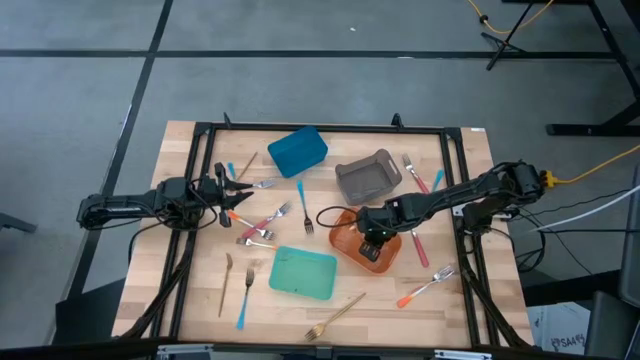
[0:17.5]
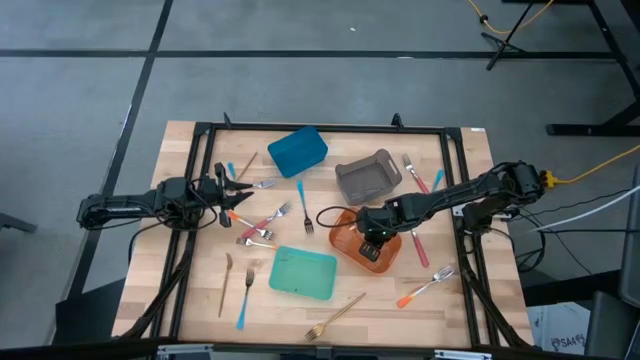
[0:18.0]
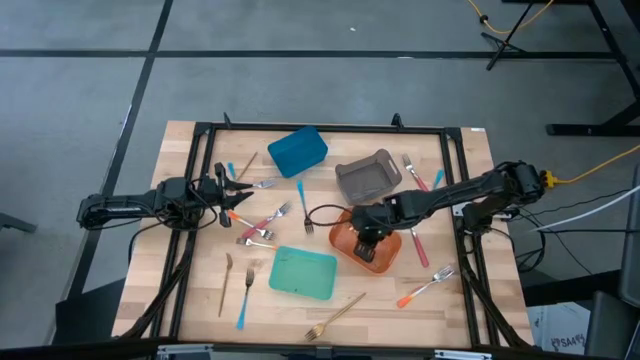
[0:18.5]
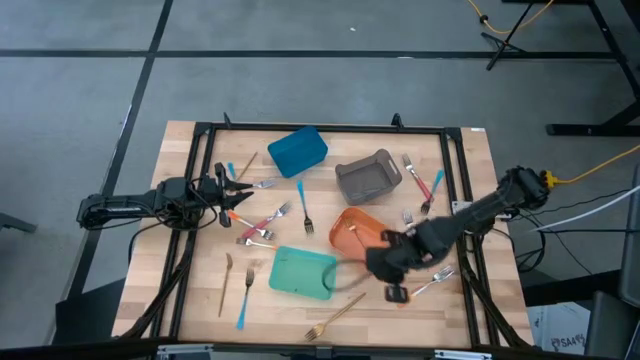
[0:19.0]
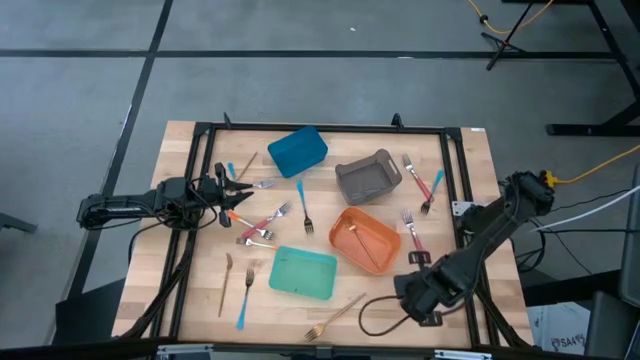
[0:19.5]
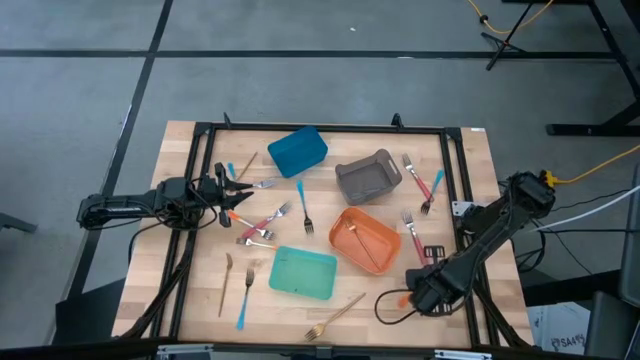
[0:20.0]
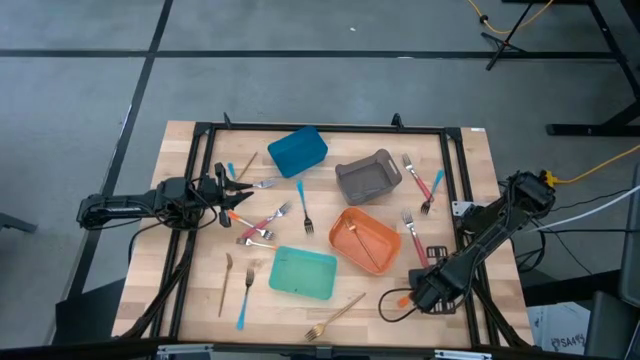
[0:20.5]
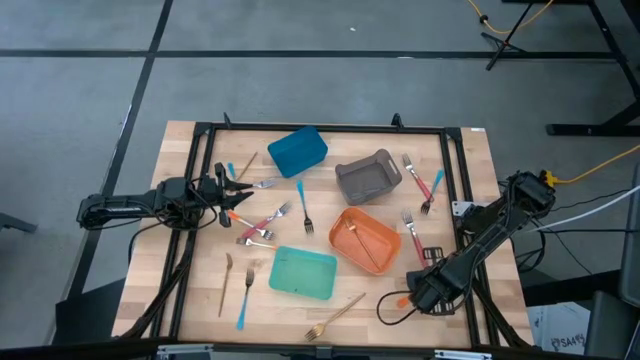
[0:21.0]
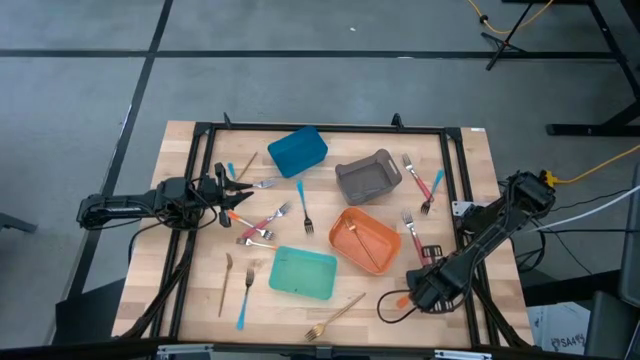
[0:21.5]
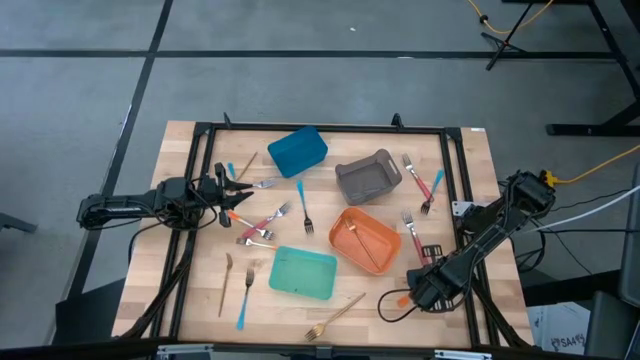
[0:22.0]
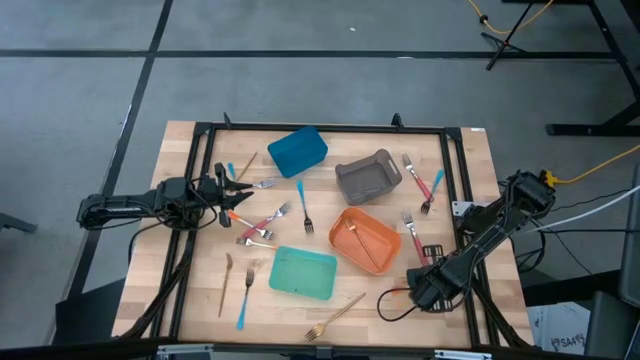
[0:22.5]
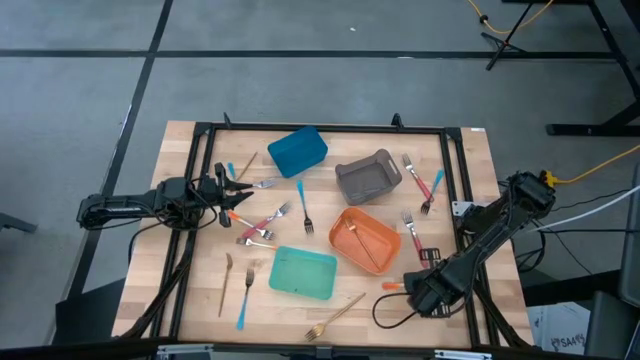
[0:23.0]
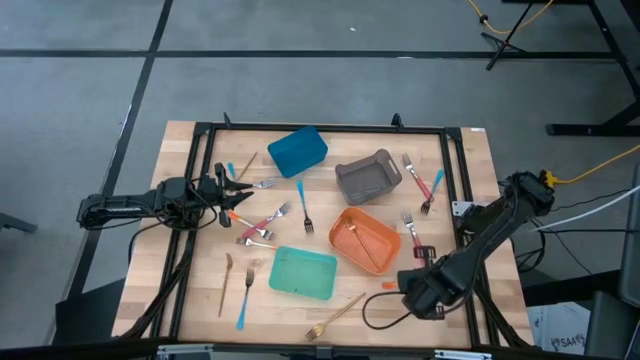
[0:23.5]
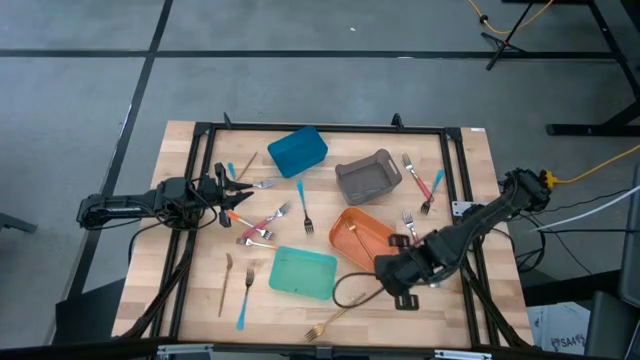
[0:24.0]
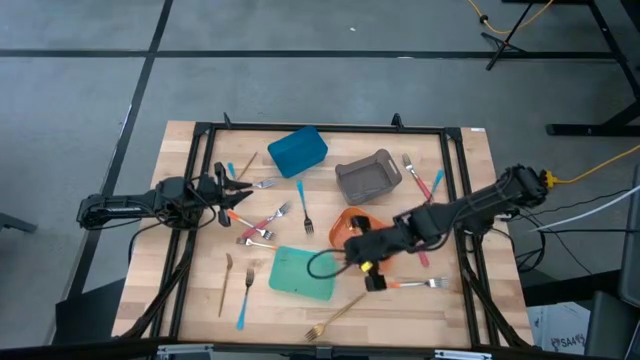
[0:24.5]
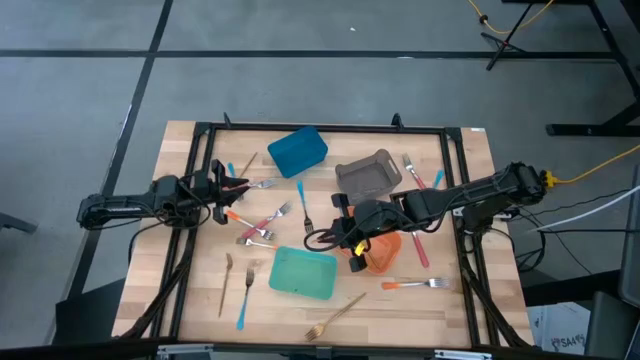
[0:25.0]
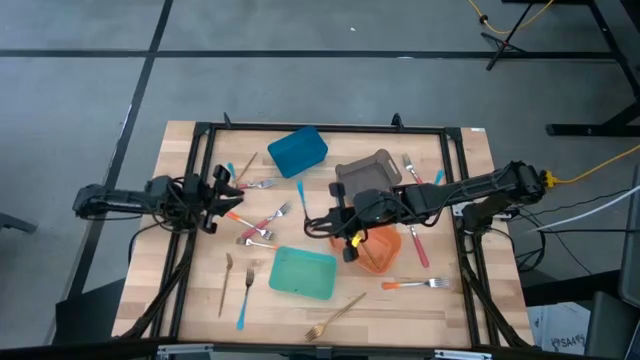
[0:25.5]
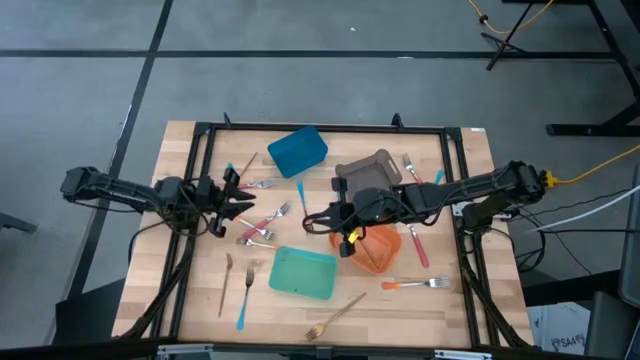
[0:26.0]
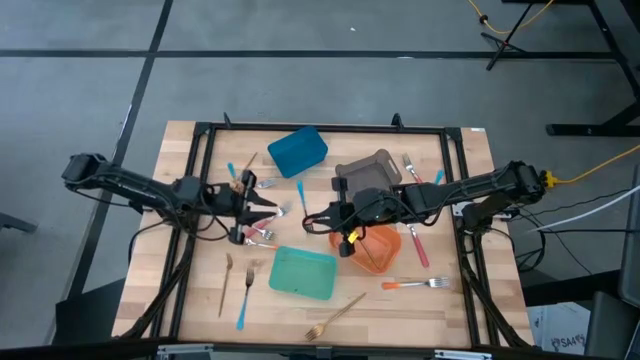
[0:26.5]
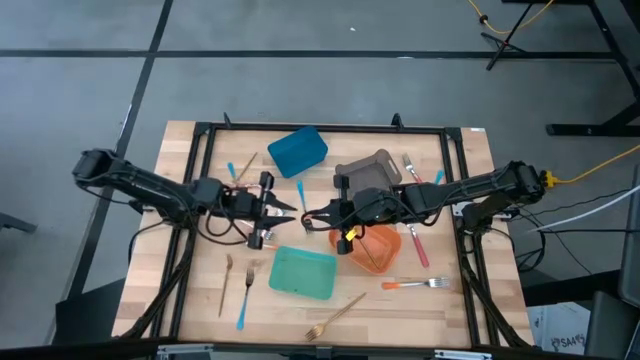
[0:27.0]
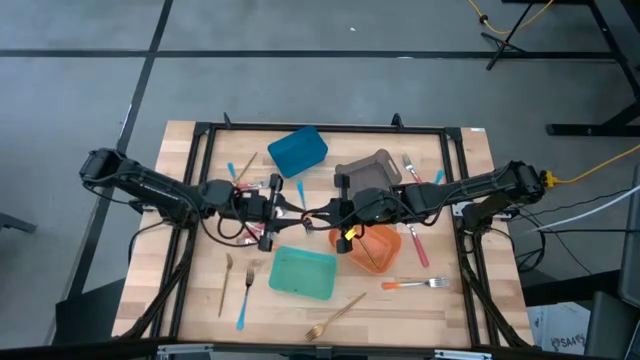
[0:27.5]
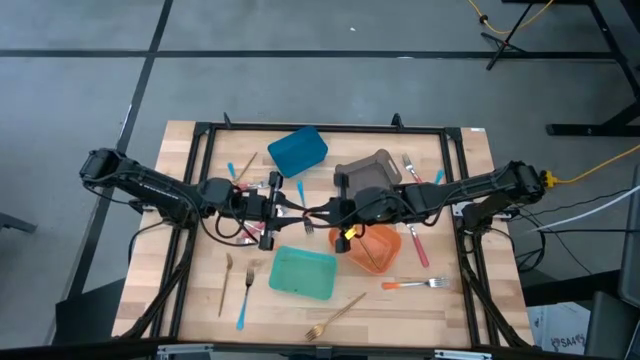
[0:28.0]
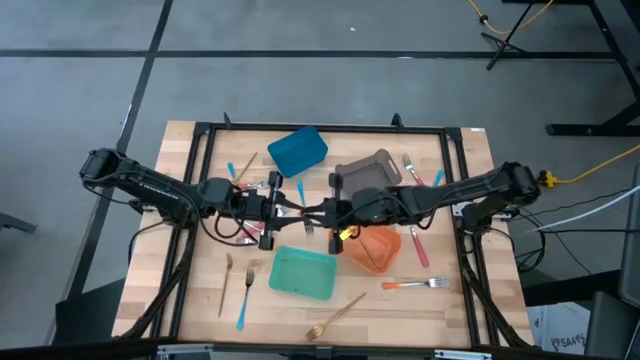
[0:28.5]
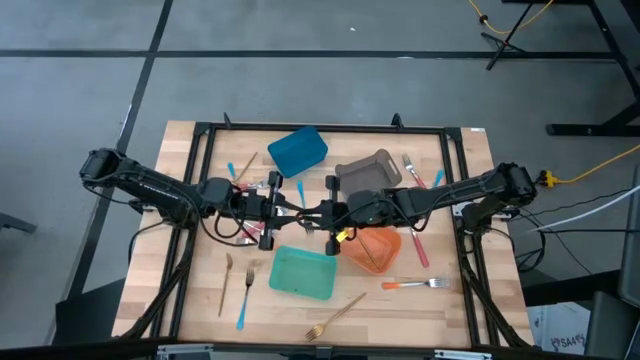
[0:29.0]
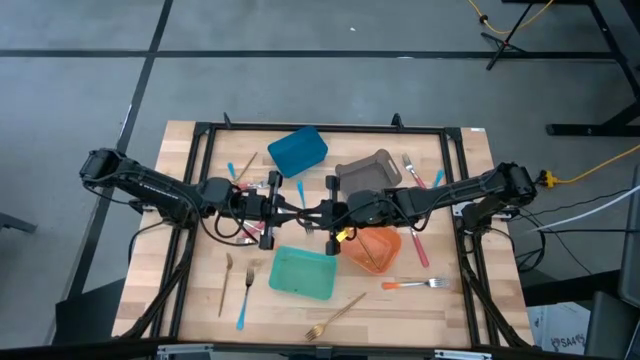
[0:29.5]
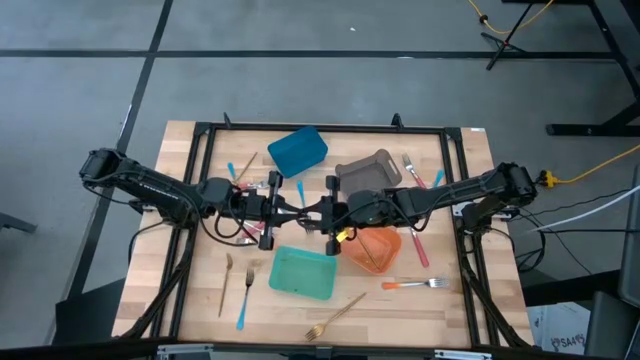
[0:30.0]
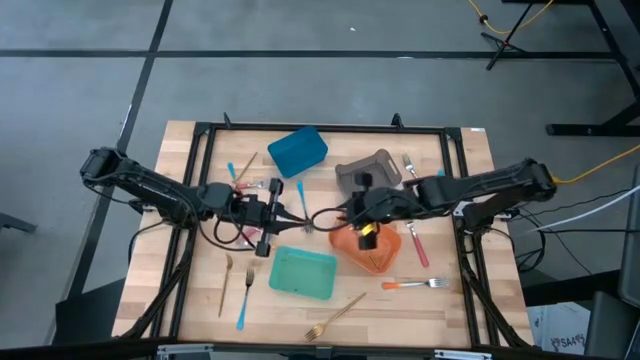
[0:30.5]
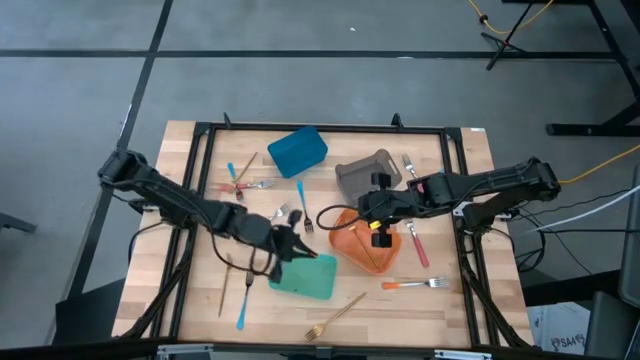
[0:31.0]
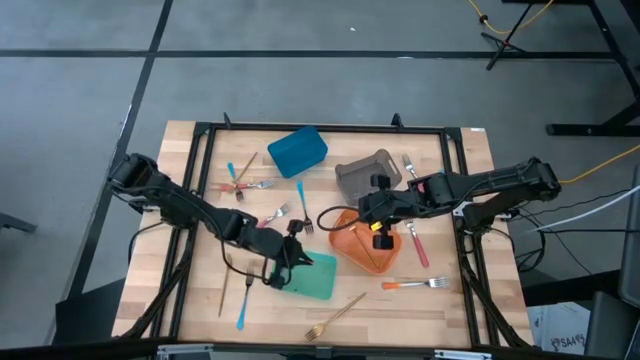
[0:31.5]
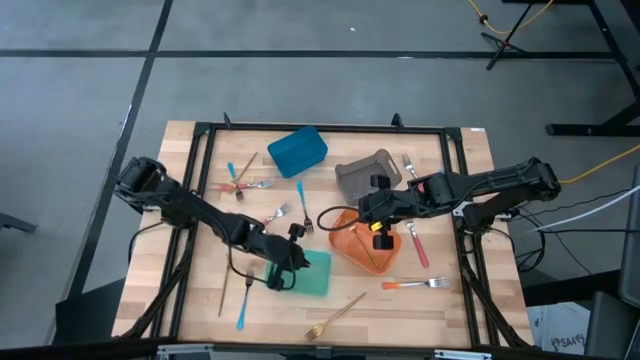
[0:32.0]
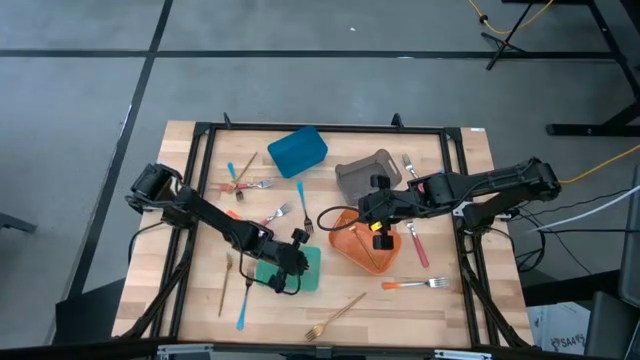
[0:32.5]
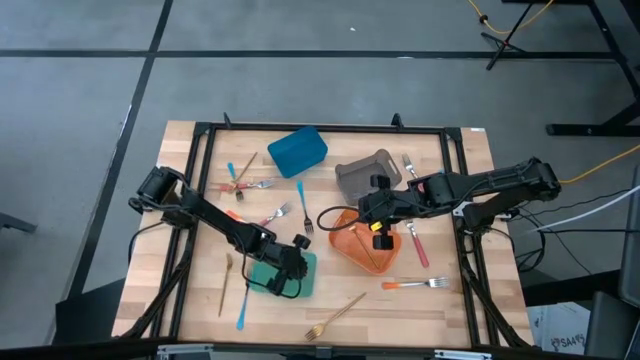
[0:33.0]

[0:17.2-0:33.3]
Task: Sort silverware by color (type)
Put the orange fork into the green bin

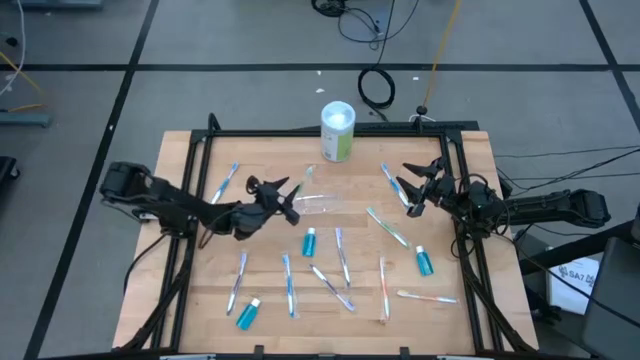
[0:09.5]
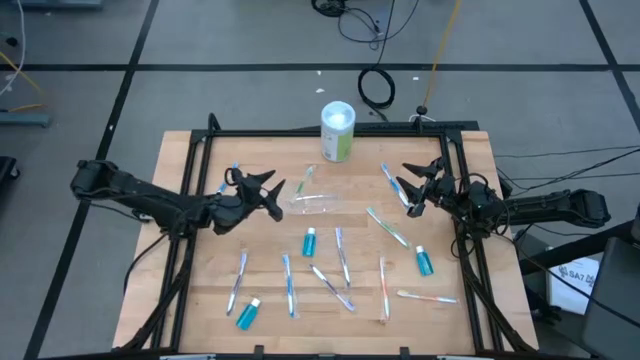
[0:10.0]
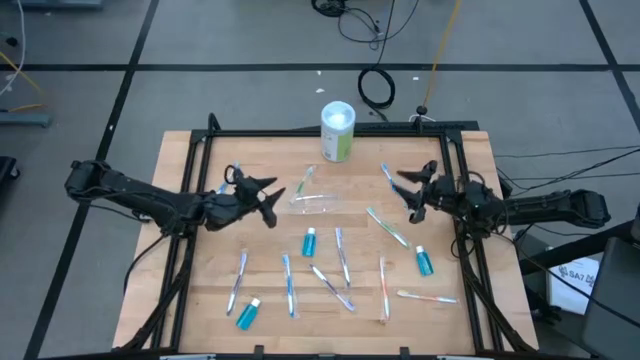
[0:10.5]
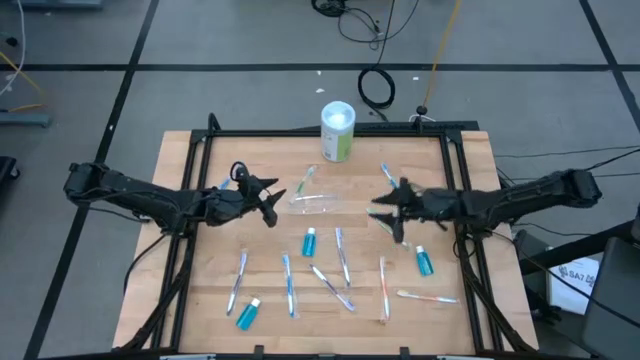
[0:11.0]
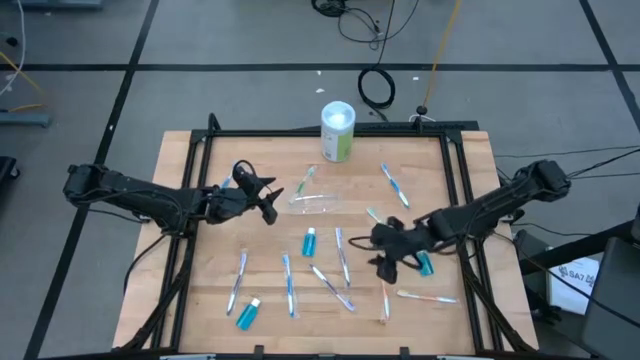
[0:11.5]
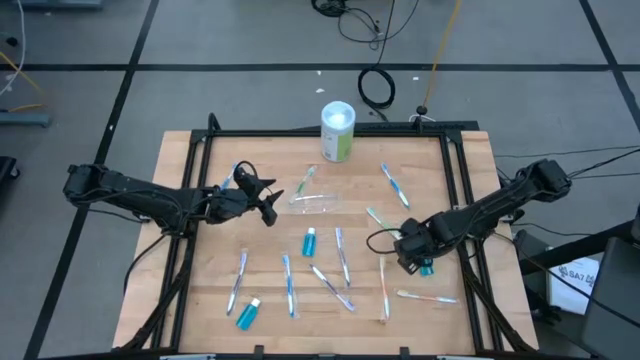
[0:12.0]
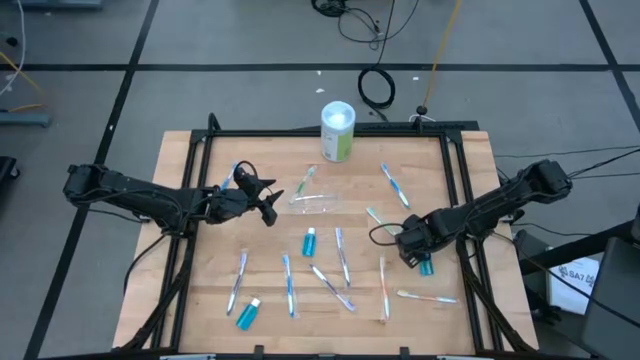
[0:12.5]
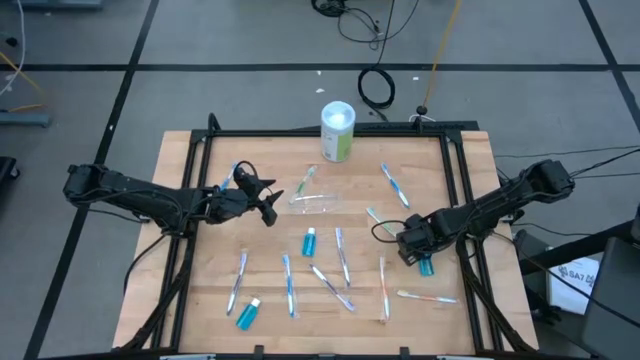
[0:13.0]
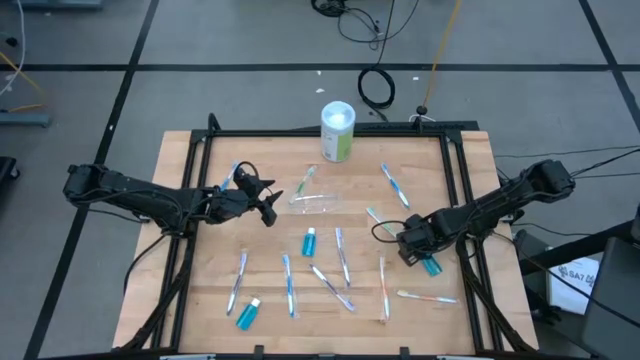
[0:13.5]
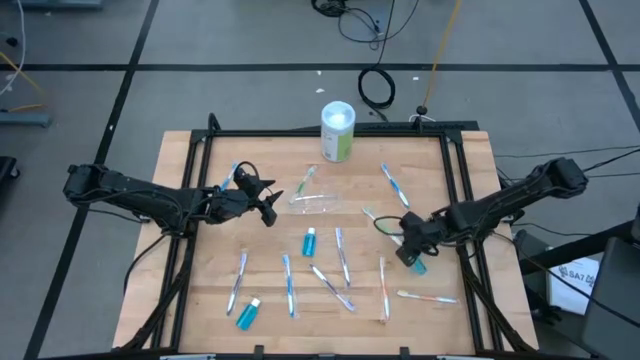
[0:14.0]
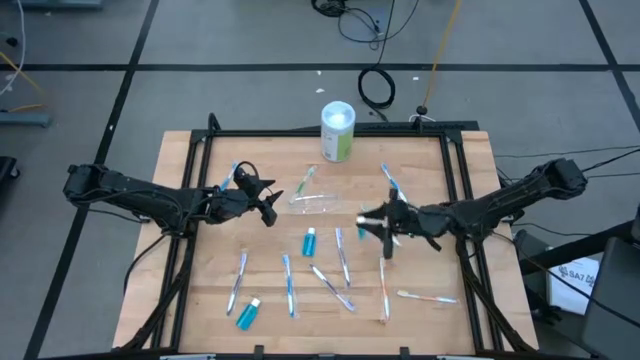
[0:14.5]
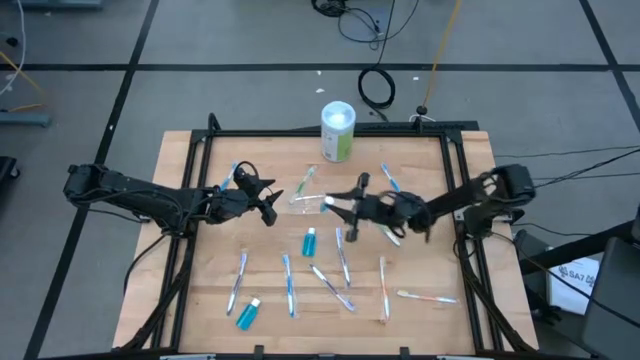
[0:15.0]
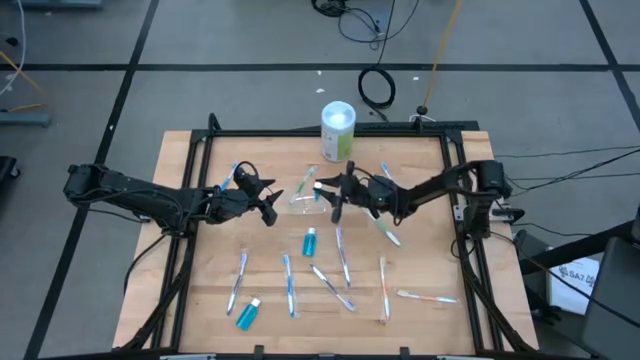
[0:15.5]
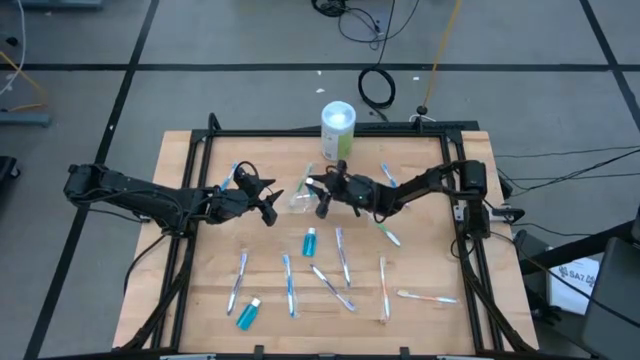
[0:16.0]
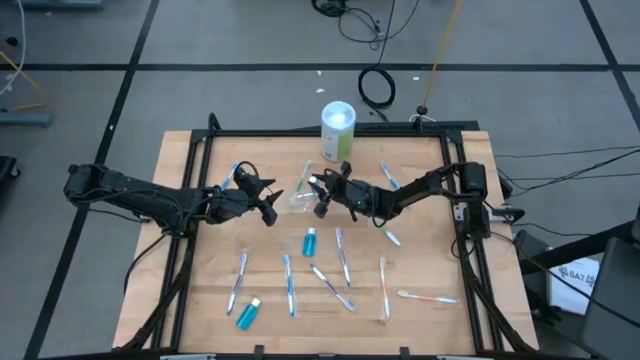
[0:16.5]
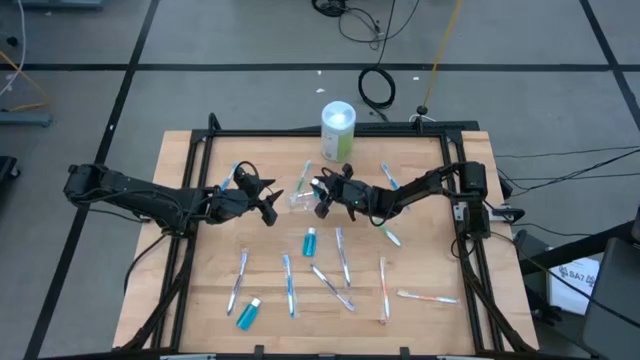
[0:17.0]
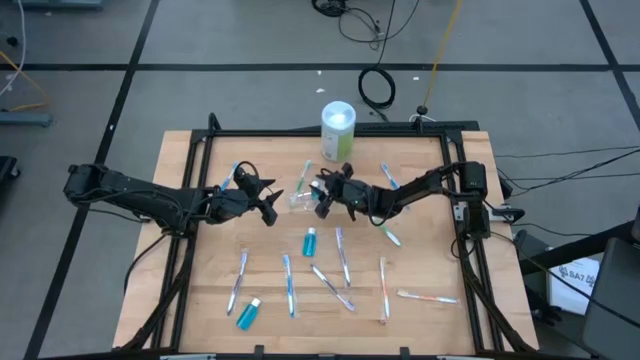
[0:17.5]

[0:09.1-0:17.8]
Task: Pick & Place toothbrushing station
Put the top right blue mouthwash into the transparent organizer
